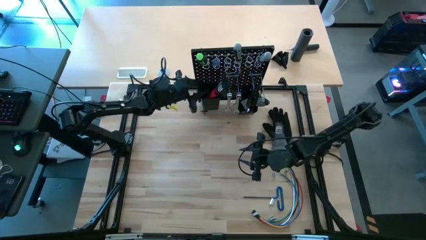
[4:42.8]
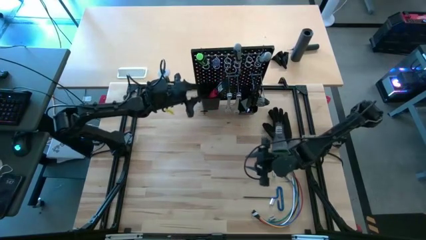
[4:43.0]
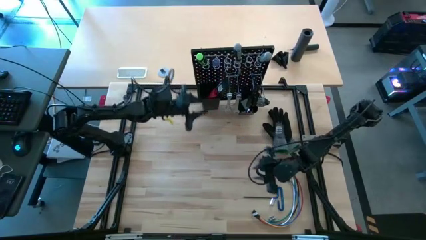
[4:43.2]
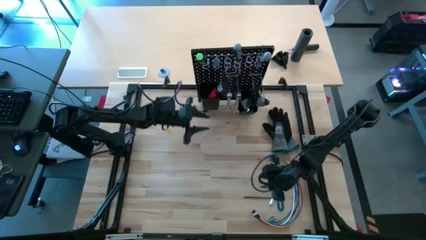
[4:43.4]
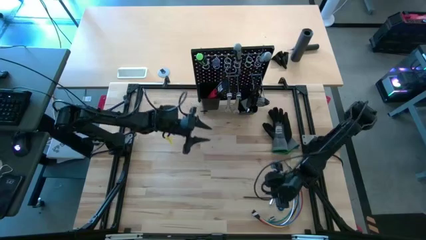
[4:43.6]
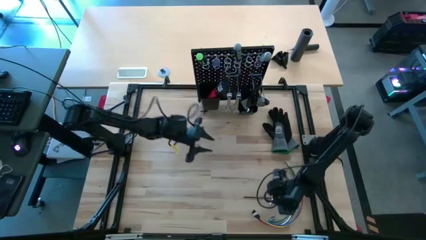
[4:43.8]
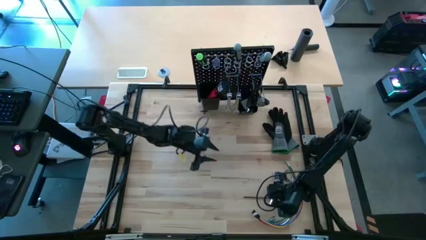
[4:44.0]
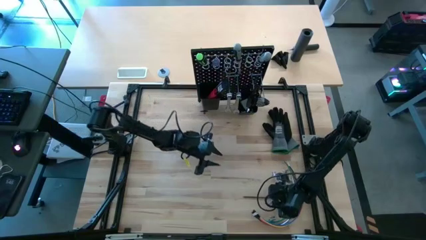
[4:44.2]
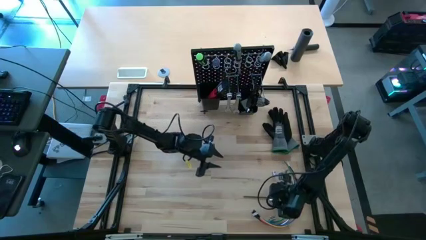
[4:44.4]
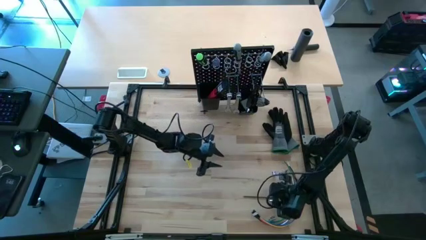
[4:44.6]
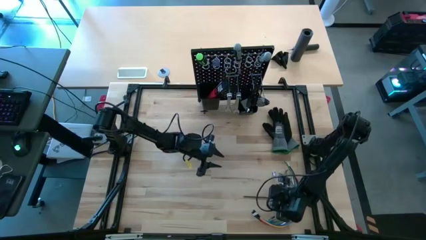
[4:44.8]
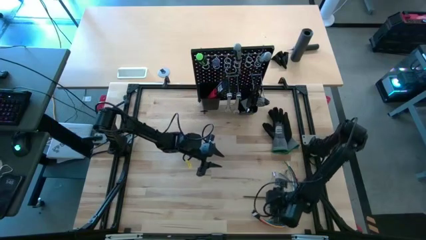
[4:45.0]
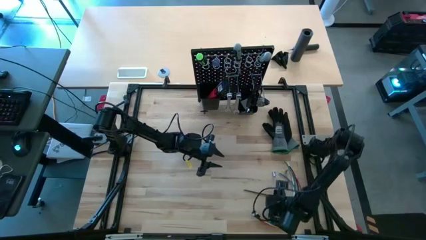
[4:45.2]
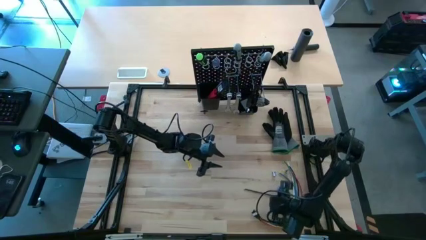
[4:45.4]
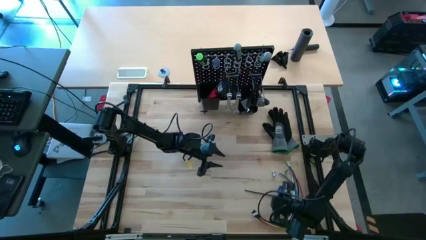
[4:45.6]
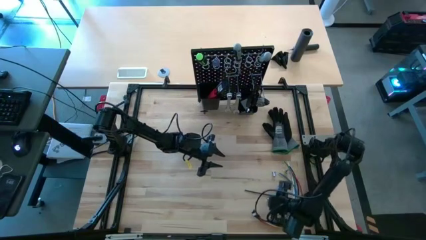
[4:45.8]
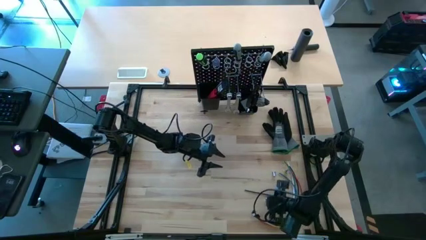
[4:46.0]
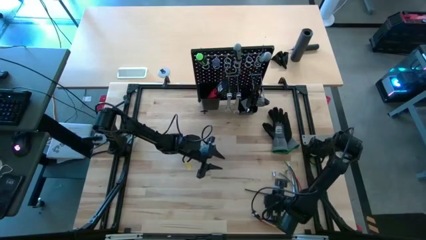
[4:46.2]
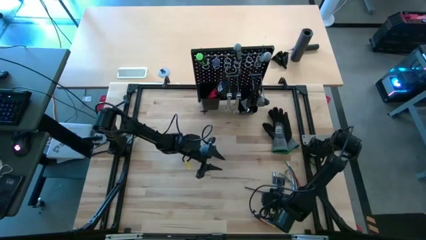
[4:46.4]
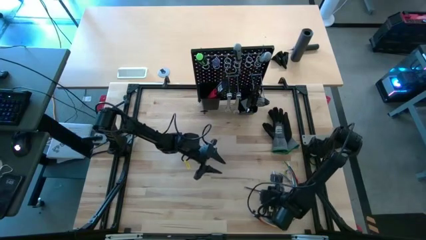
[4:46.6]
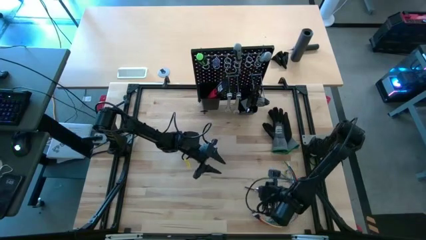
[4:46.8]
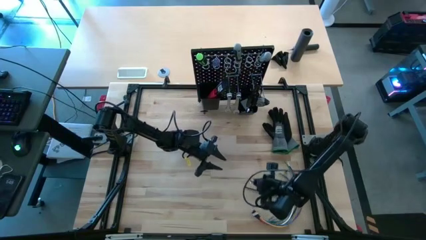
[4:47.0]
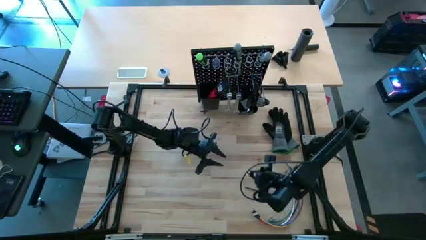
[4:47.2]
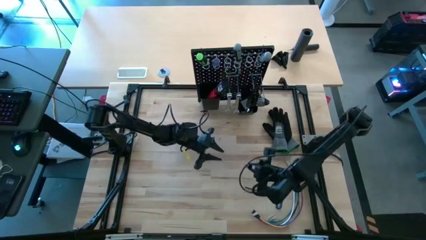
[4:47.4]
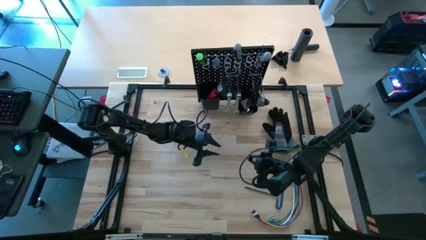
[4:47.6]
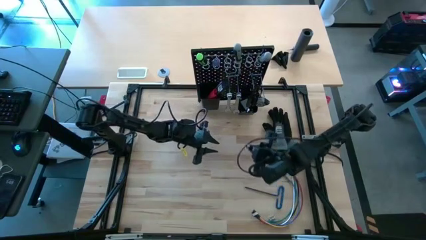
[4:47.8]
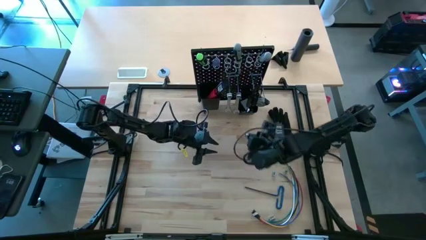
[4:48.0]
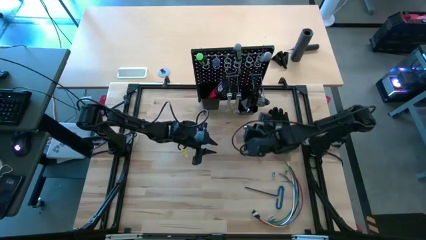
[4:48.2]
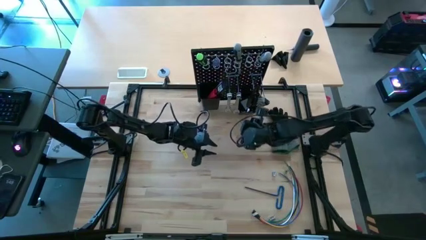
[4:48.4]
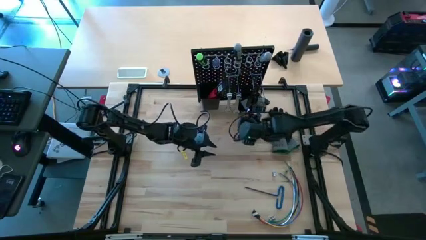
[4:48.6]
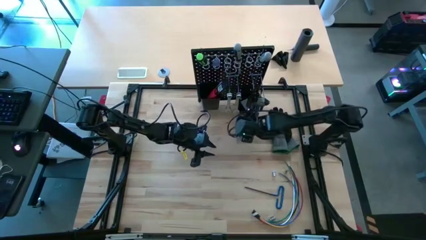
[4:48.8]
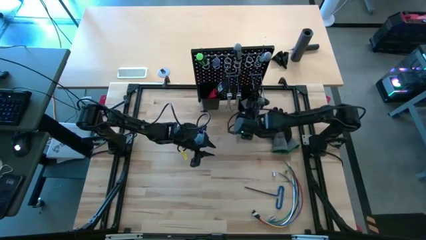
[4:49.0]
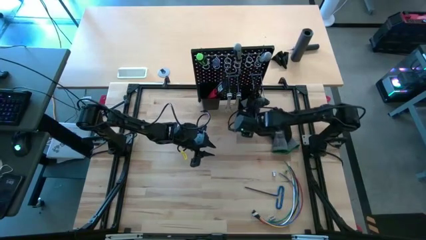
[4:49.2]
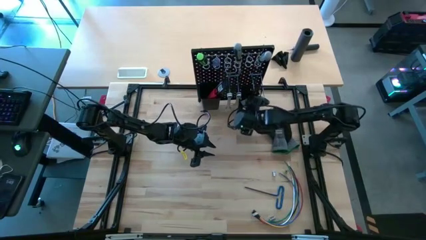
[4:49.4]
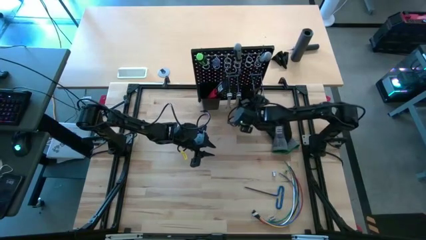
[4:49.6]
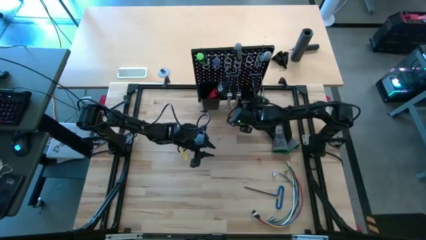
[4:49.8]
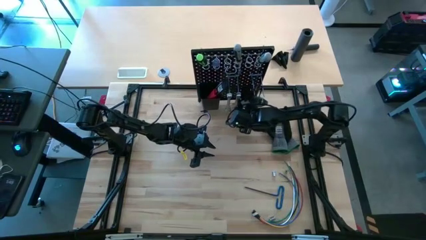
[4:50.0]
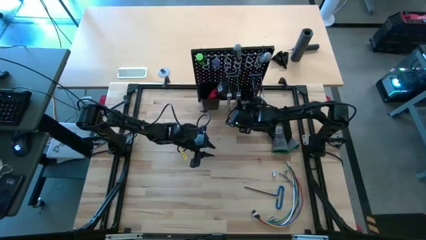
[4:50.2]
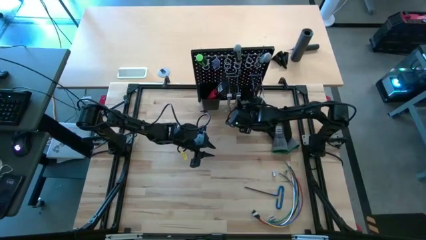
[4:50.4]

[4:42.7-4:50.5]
Task: Hang tools onto peg board
Put the silver socket on the right black bin on the peg board

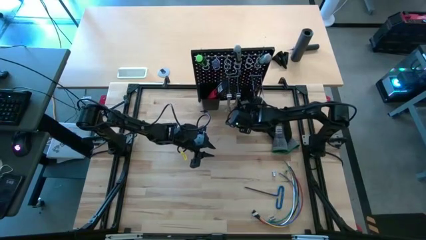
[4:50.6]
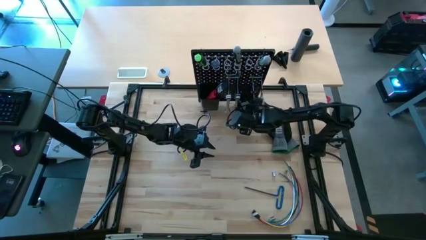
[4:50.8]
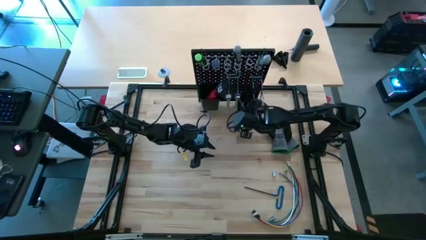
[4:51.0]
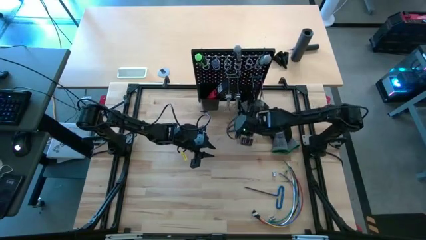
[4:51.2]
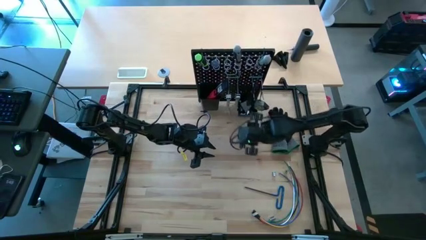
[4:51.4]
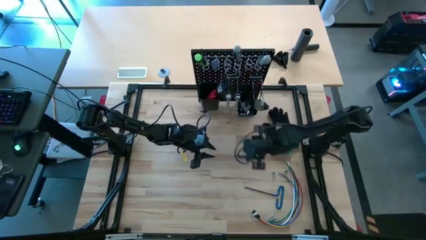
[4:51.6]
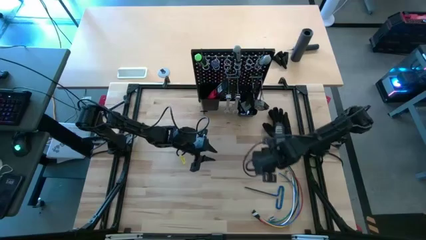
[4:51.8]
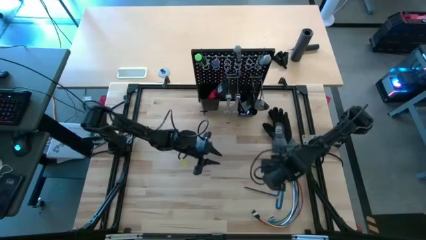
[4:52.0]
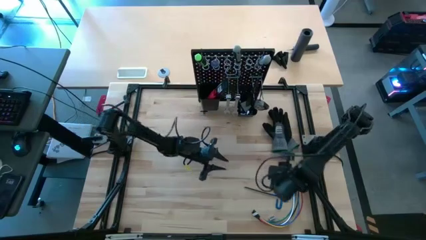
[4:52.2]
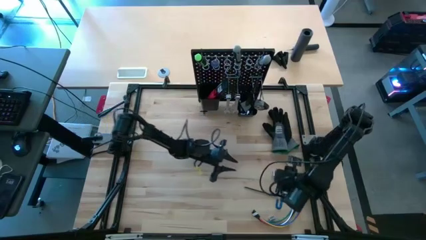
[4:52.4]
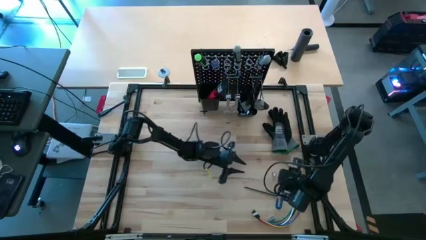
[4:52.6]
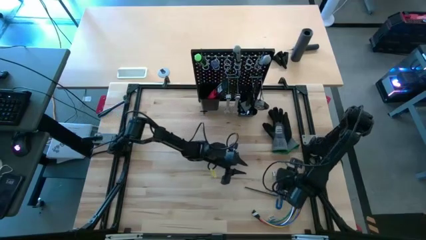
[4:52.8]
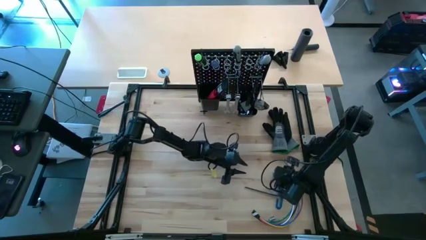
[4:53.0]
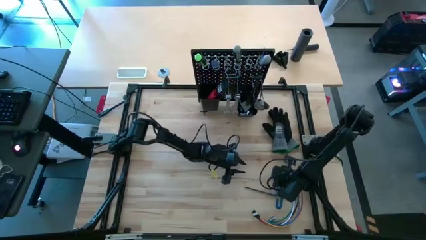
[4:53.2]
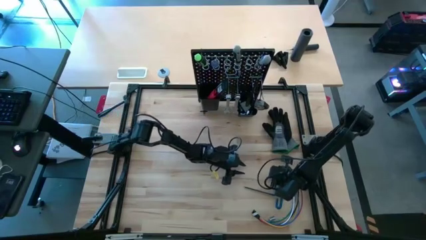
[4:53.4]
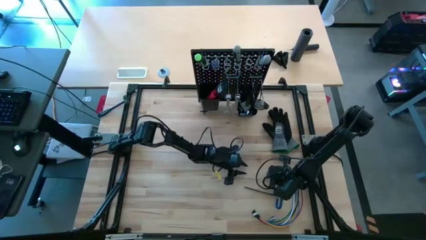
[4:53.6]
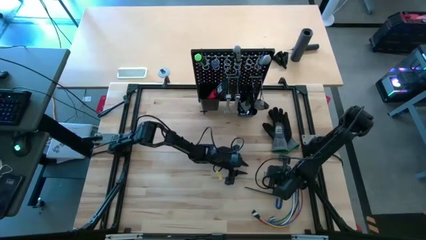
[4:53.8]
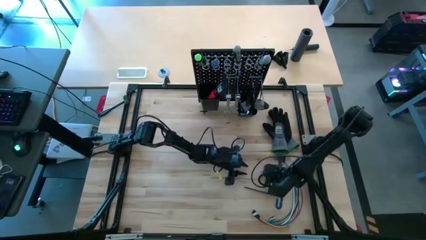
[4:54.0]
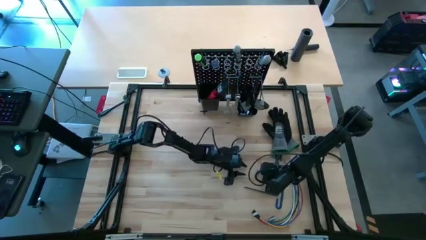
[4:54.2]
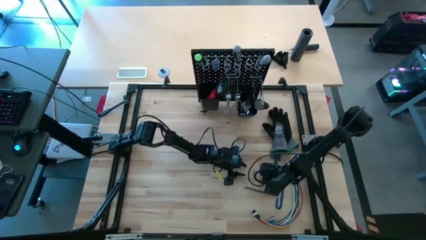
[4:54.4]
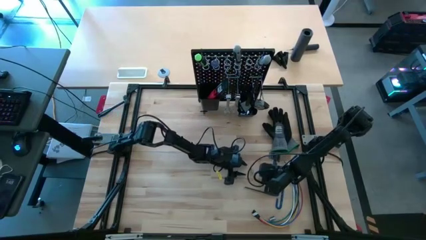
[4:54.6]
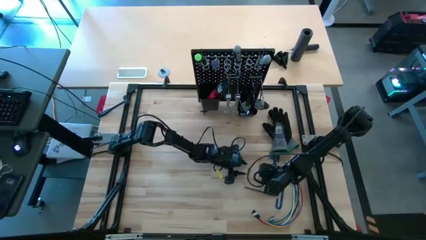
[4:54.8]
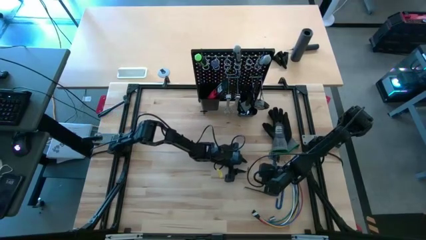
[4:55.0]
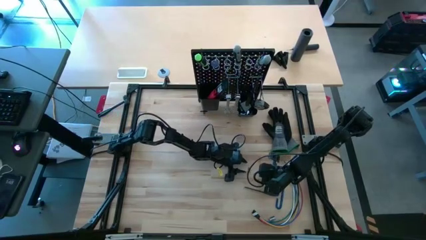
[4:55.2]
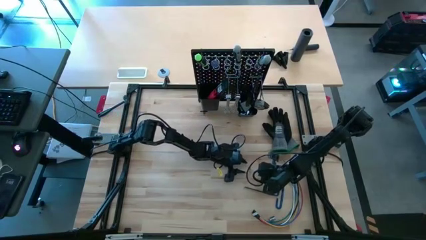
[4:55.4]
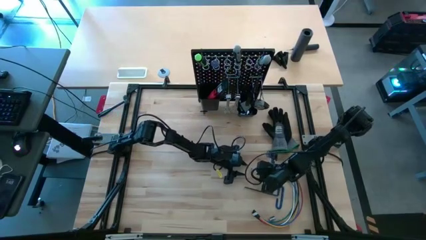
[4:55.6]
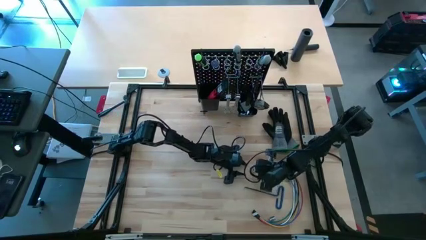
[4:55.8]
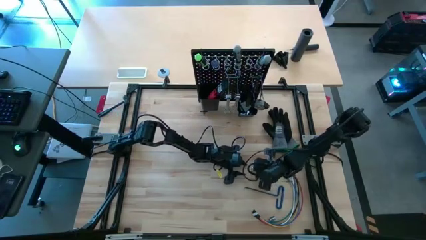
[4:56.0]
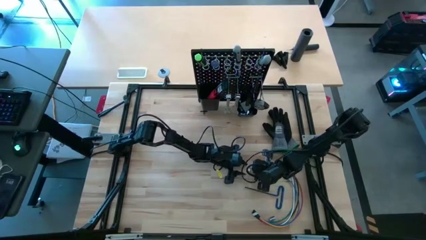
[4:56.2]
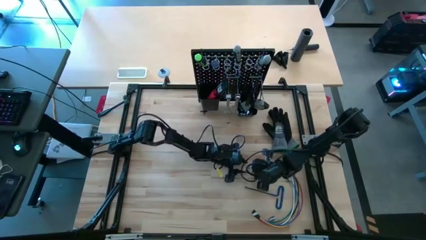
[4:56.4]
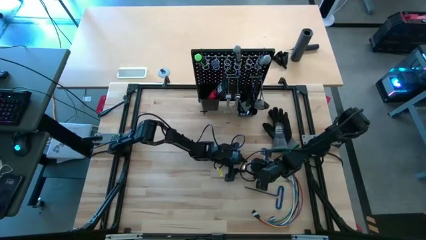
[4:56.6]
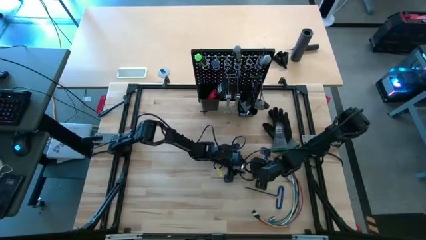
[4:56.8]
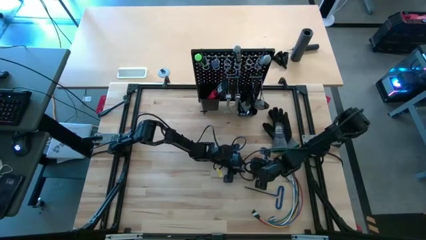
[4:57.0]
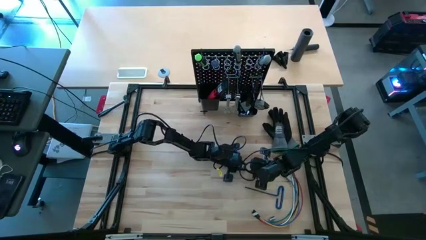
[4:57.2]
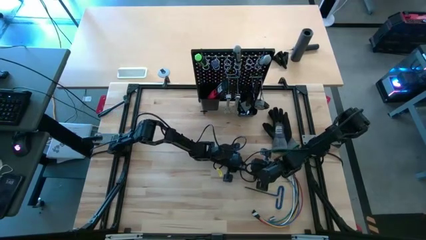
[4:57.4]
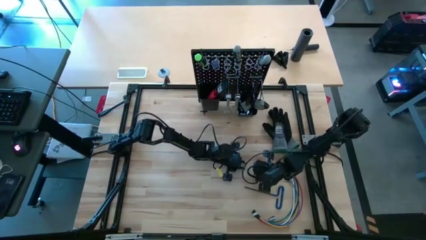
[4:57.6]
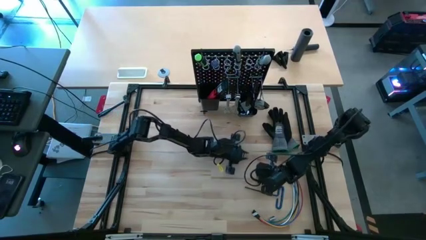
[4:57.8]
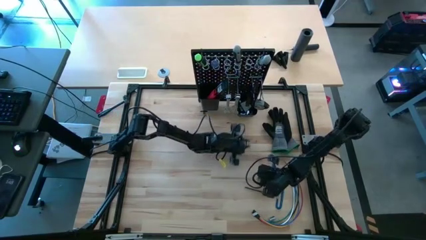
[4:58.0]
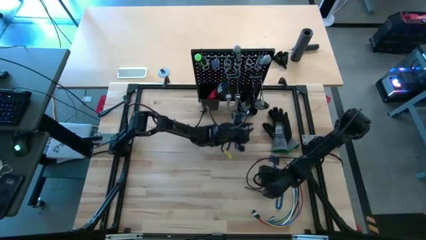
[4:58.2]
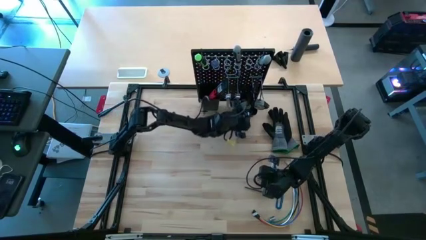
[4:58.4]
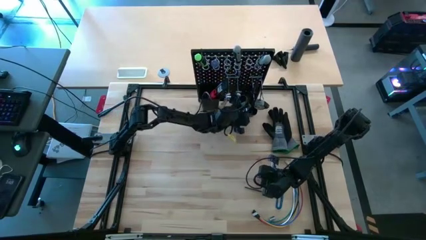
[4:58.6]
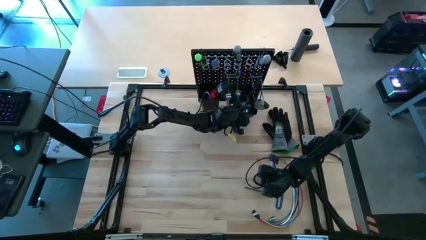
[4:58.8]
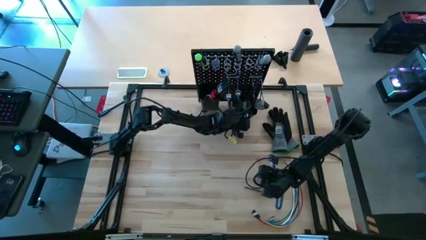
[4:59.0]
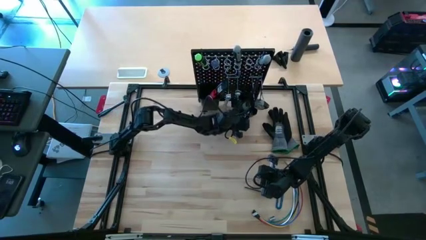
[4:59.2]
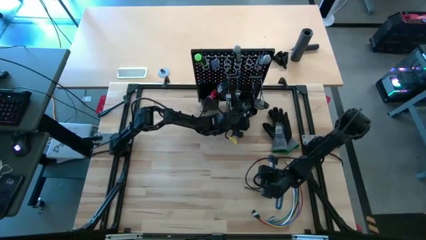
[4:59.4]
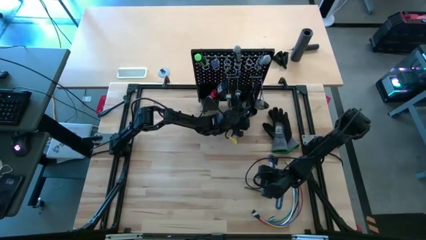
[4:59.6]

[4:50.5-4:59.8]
Put the silver socket on the right black bin on the peg board
